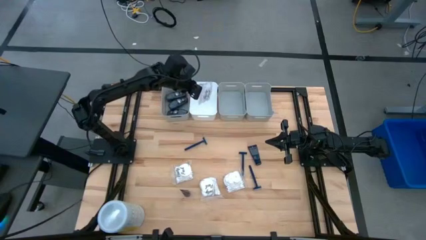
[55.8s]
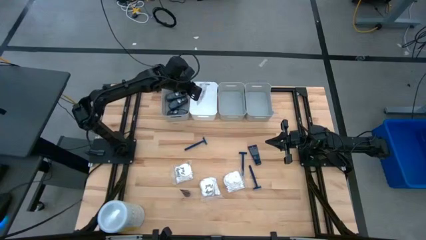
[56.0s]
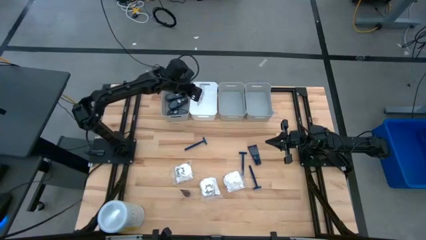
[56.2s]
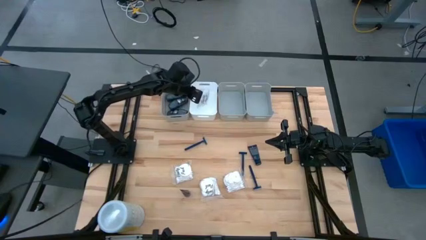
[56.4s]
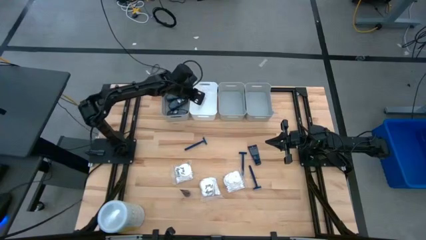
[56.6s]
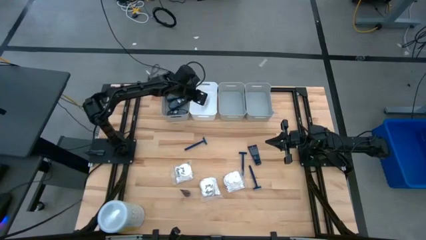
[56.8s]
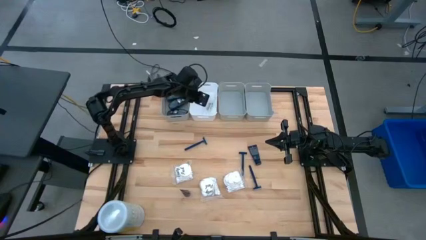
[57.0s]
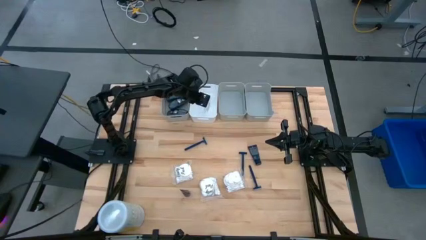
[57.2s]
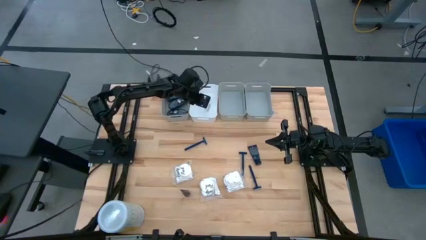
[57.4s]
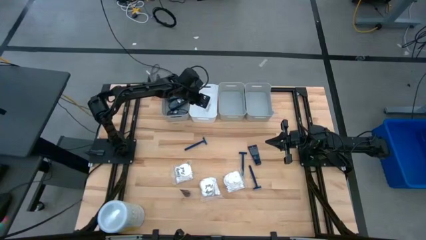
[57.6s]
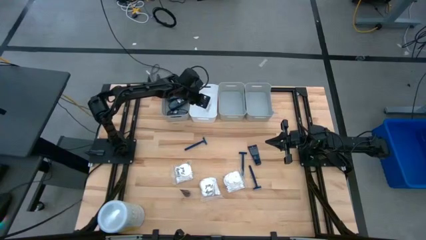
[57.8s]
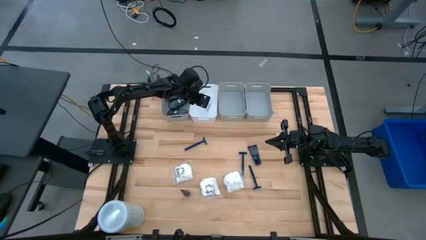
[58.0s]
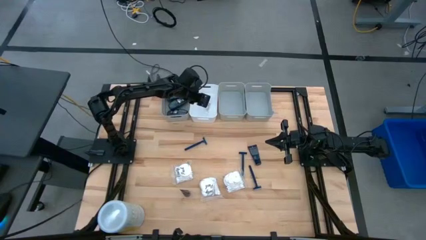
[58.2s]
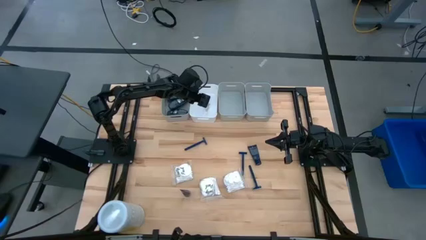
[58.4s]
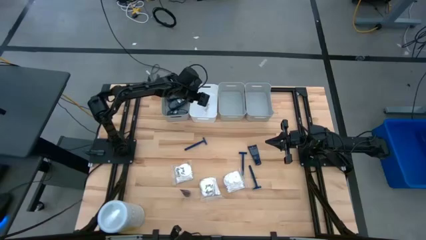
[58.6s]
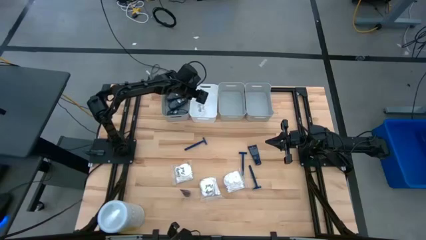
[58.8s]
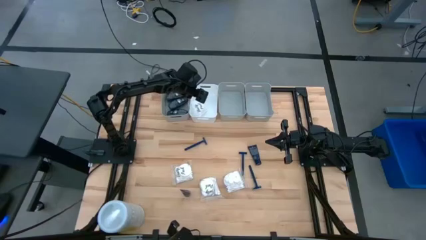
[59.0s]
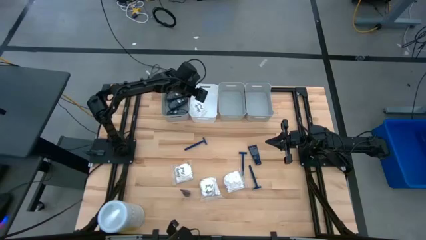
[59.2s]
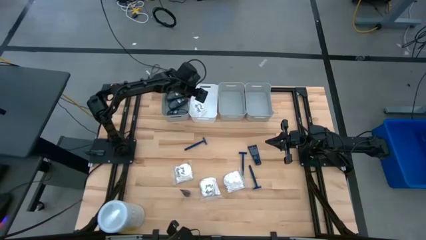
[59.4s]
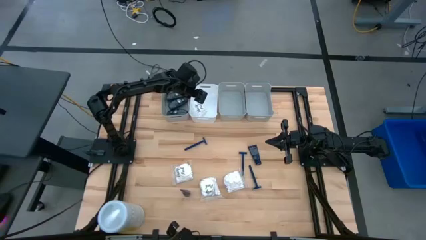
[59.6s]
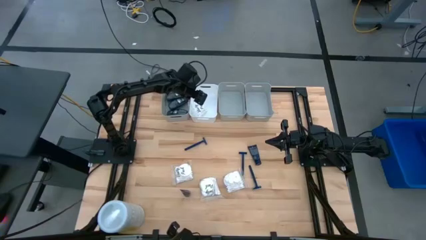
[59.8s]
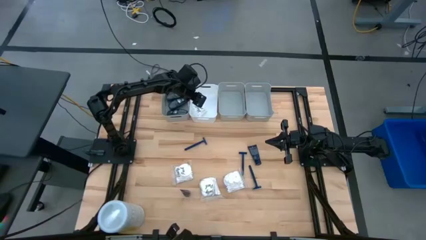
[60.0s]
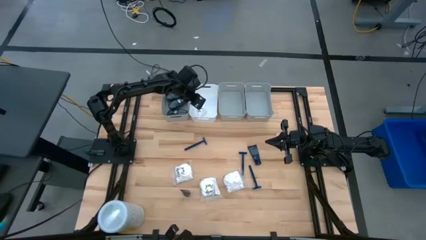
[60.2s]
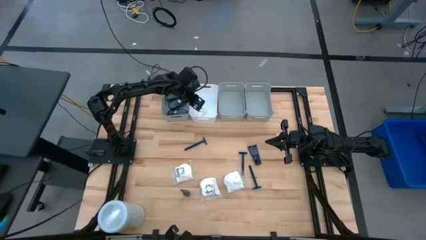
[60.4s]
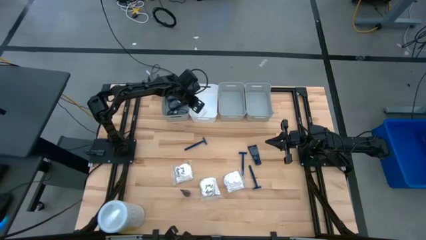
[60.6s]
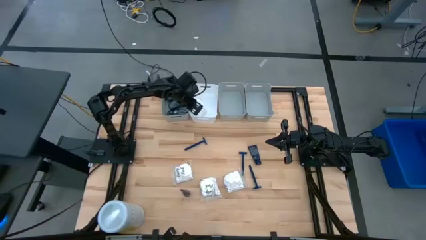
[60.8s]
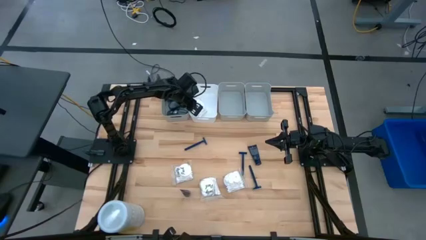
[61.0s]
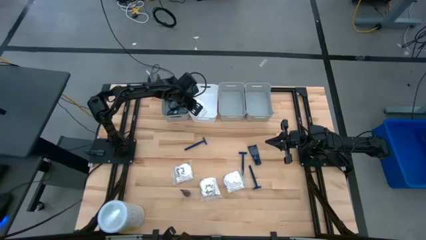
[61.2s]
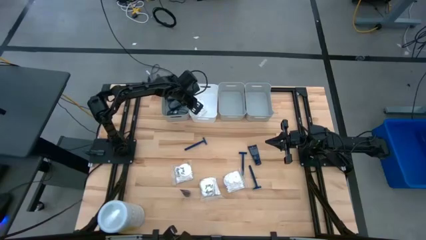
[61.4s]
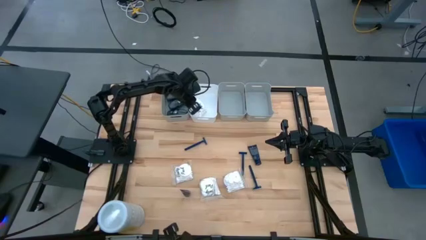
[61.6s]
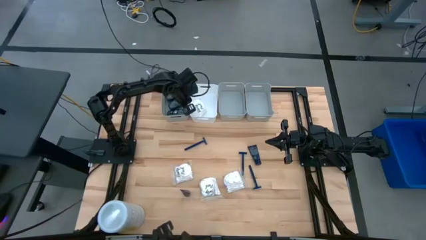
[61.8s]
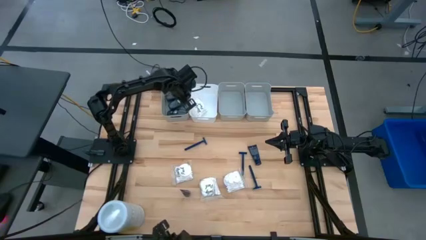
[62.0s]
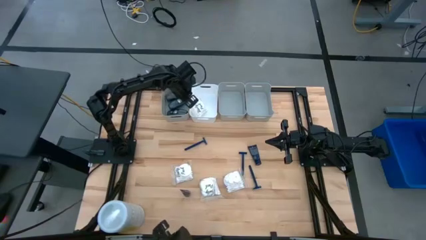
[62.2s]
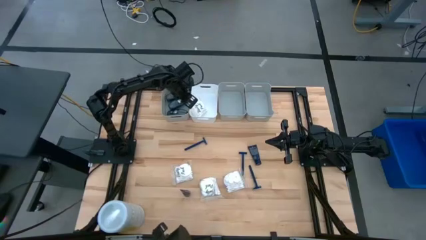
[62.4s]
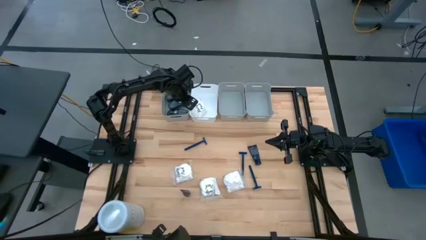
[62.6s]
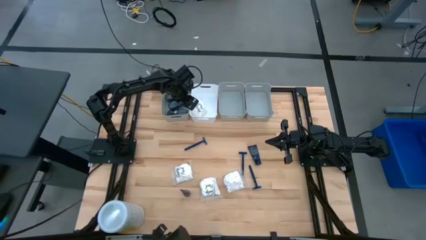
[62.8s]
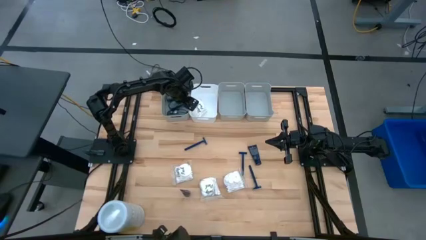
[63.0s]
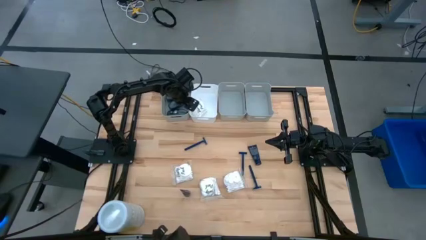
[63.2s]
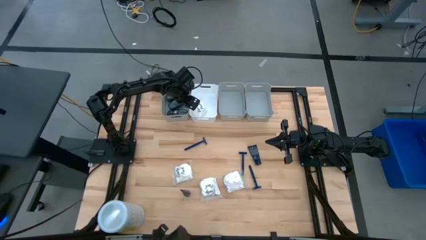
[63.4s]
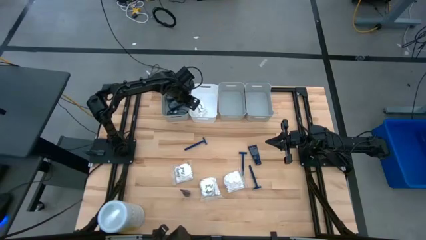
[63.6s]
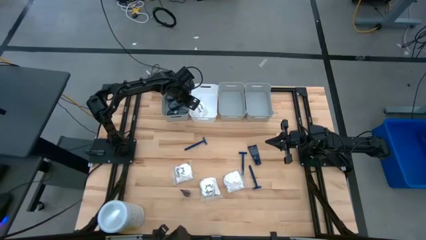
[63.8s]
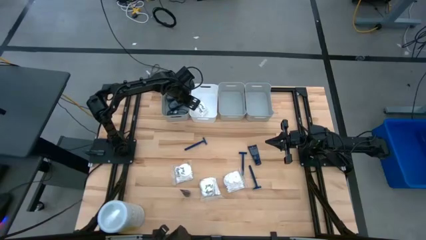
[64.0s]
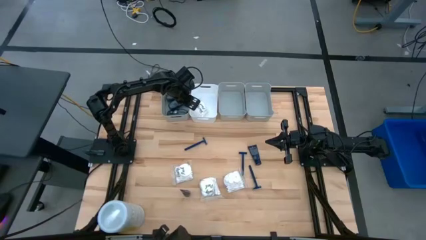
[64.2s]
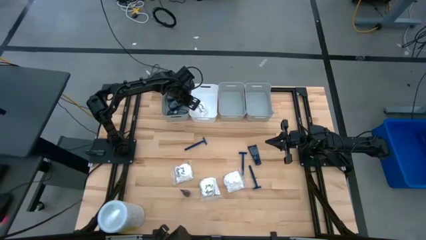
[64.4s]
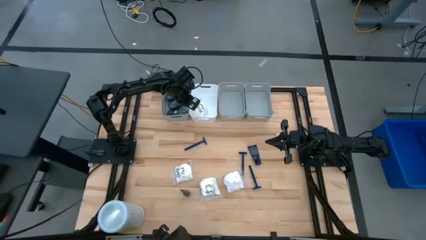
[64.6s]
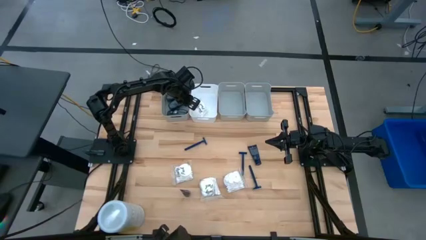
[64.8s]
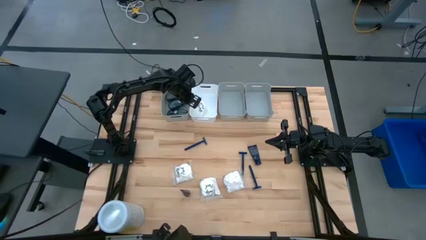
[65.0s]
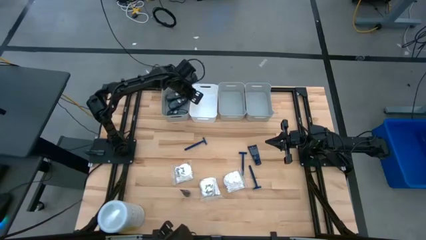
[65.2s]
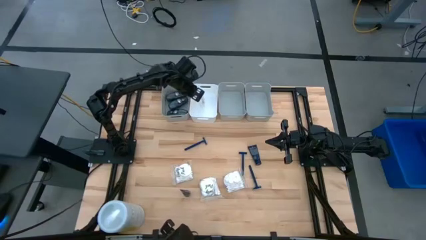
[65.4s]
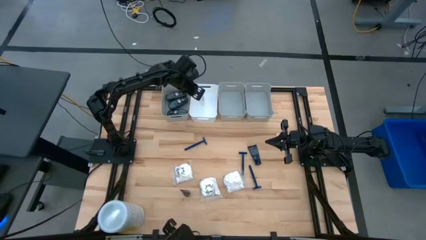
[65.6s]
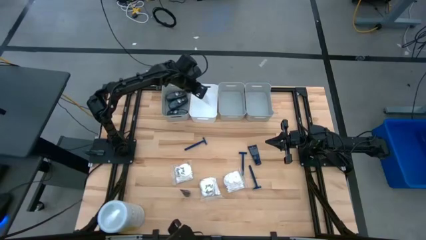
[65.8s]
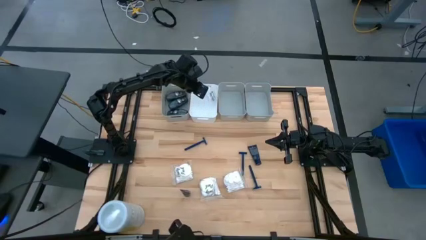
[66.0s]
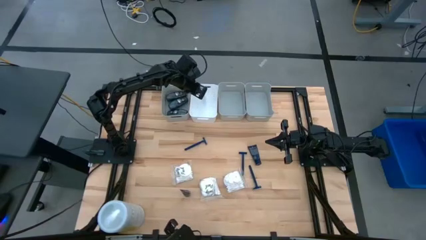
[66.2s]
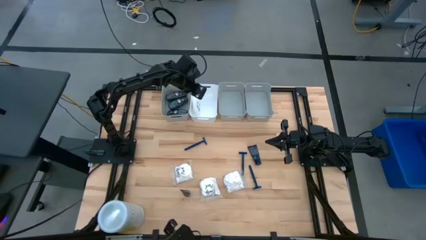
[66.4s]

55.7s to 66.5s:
Task: Pick & Place Travel size toiletries
Put the white cotton pack into the white bin
